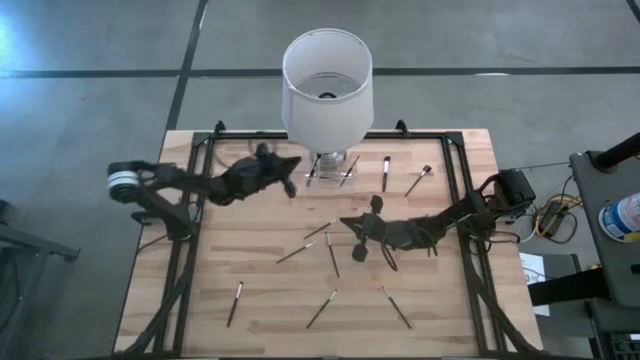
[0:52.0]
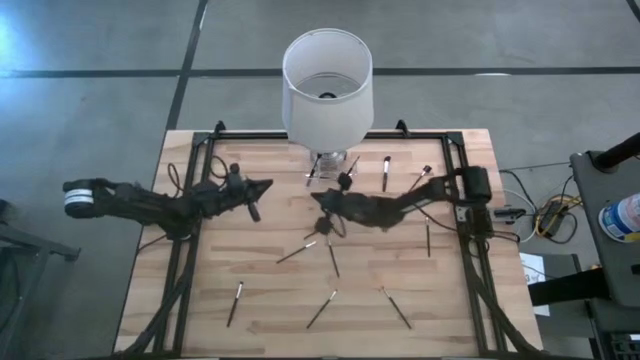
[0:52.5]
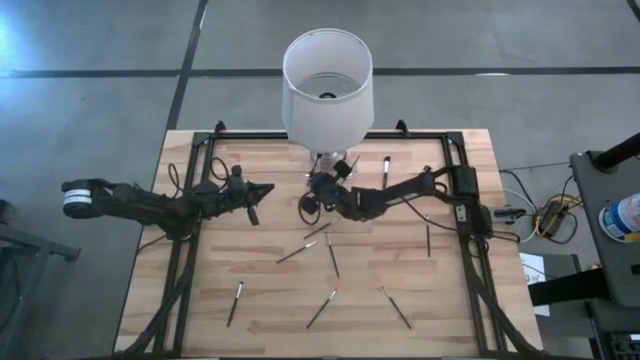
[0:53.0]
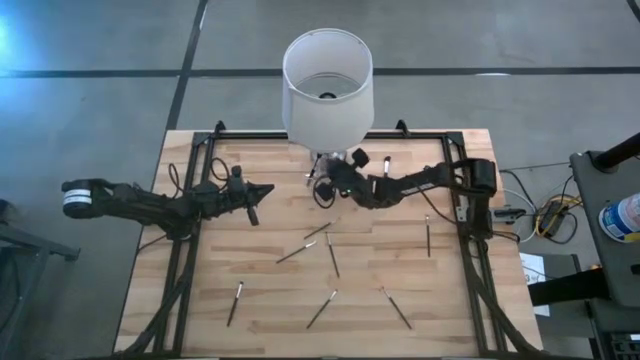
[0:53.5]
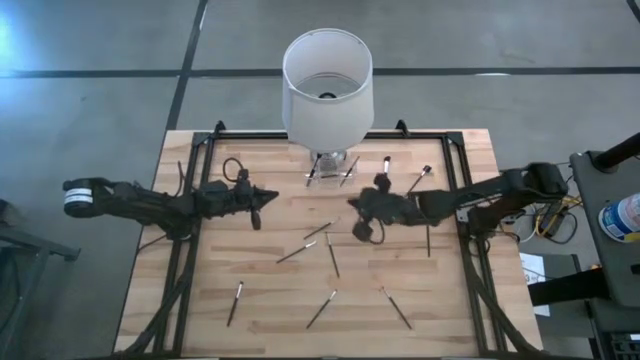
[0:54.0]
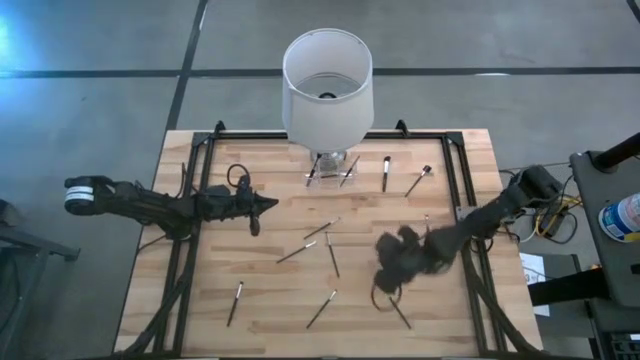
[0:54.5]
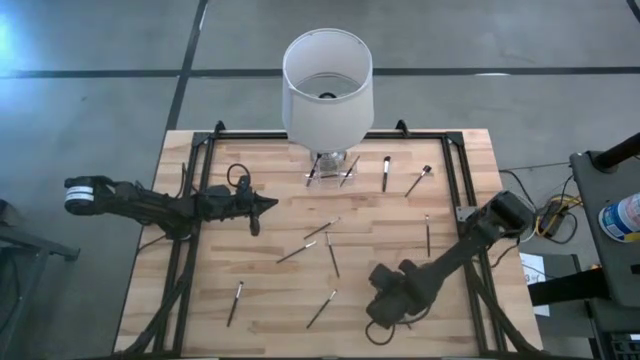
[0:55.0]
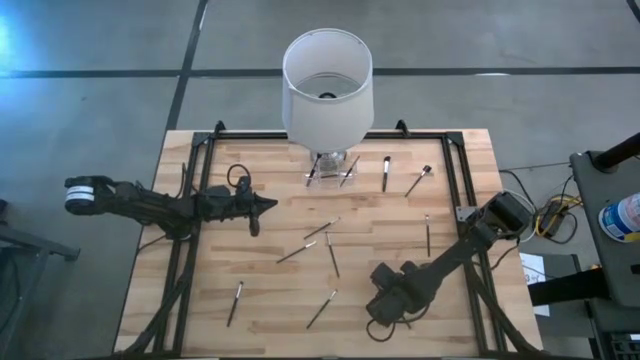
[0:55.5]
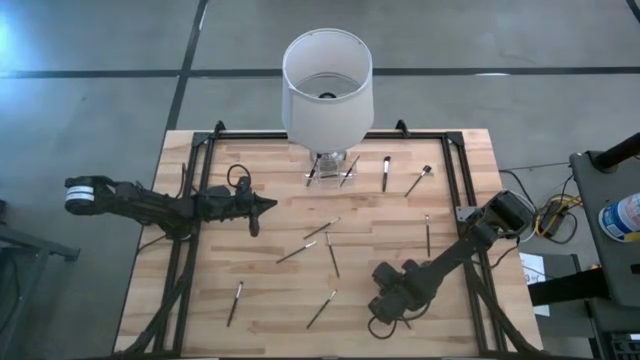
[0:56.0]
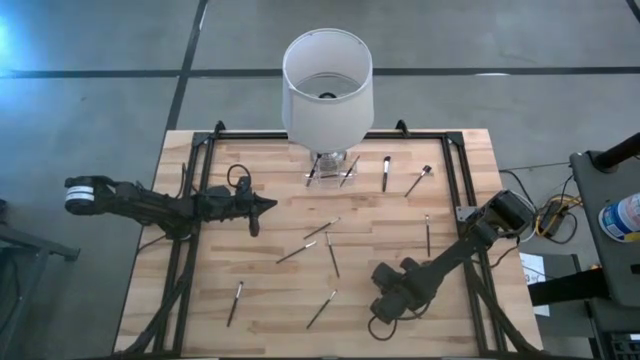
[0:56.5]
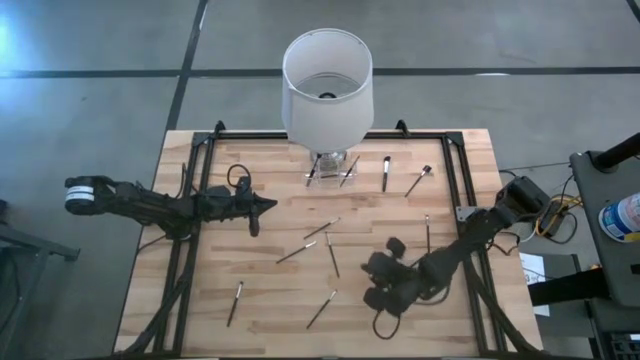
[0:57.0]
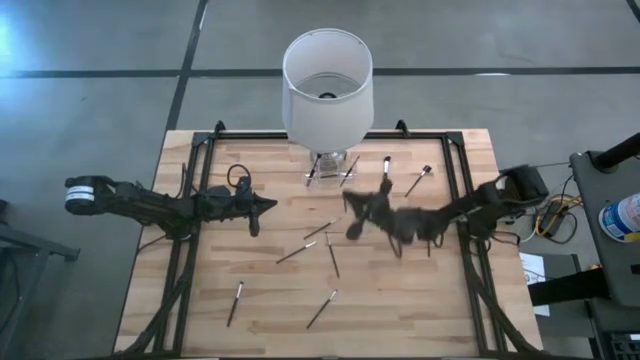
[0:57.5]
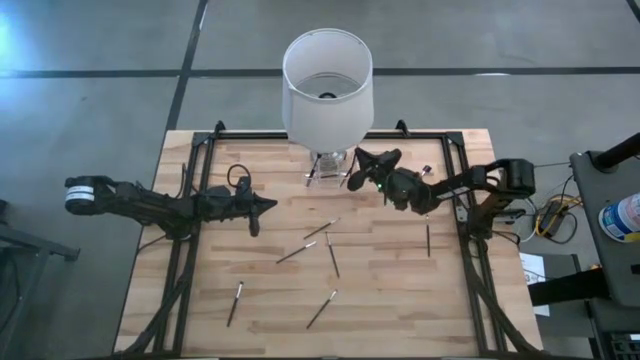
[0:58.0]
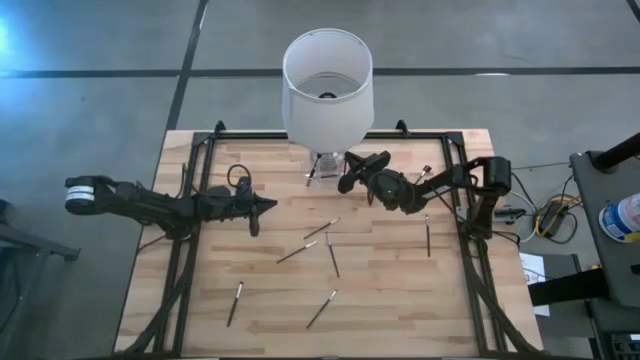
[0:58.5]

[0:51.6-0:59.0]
Task: Put items in baskets/containers
Put the black eyeshadow brush into the transparent organizer

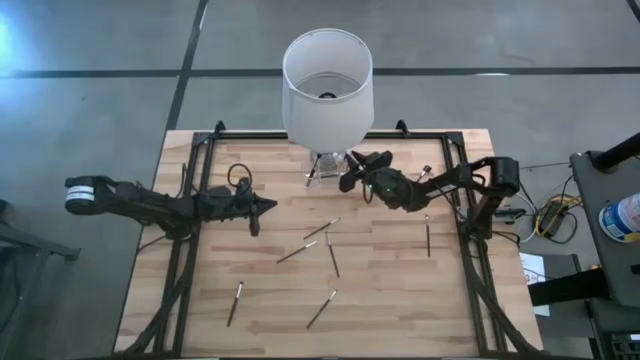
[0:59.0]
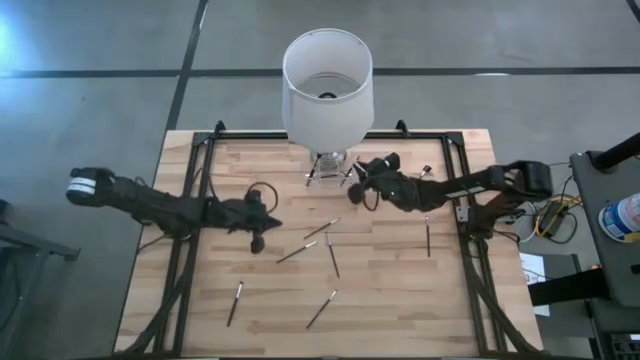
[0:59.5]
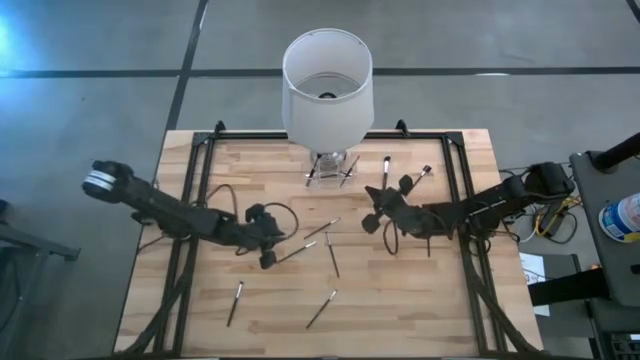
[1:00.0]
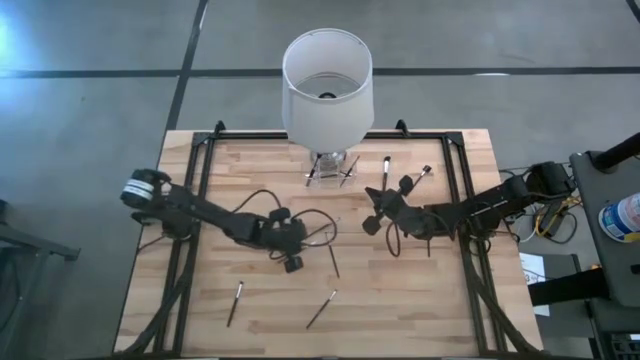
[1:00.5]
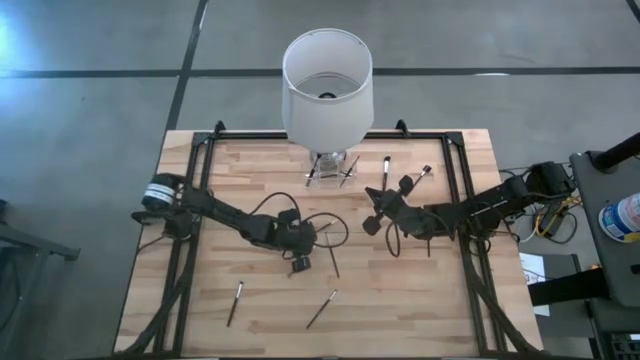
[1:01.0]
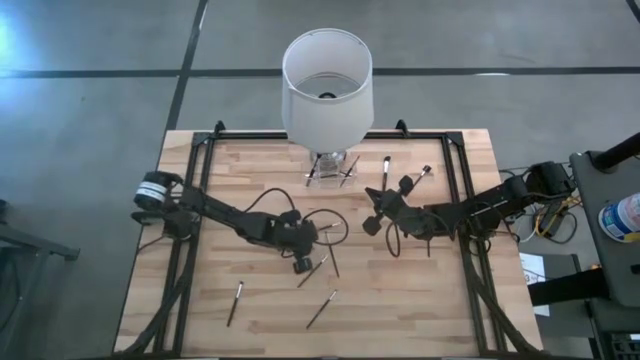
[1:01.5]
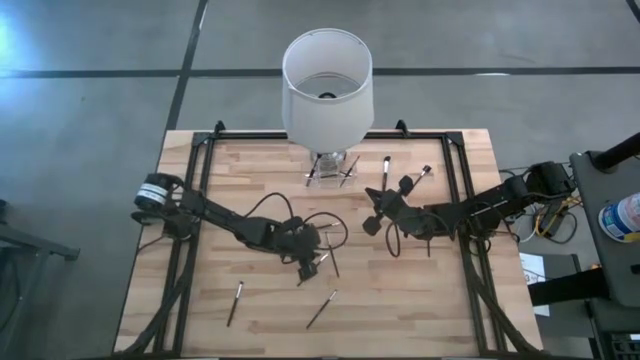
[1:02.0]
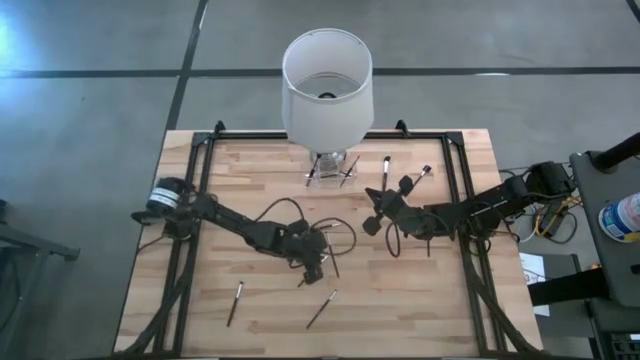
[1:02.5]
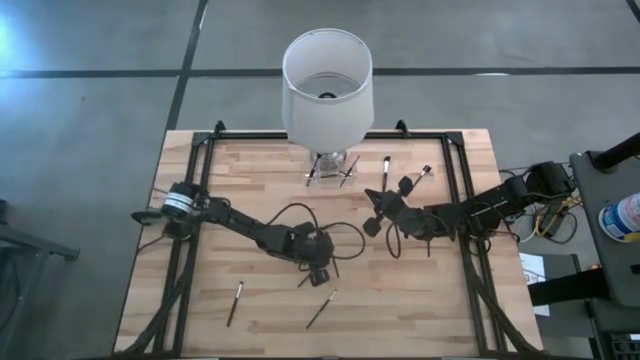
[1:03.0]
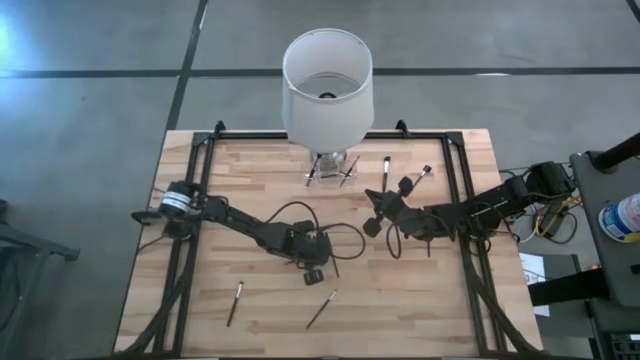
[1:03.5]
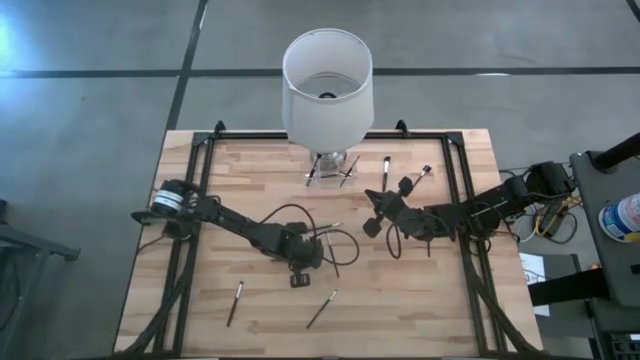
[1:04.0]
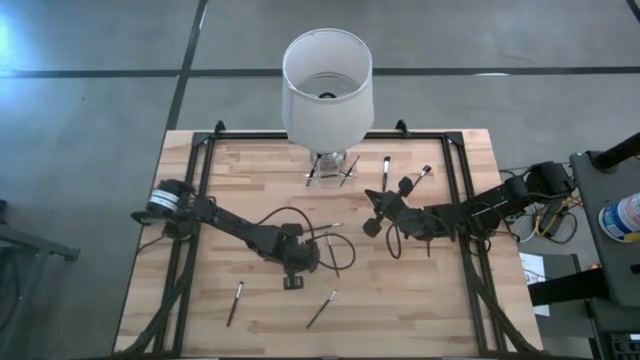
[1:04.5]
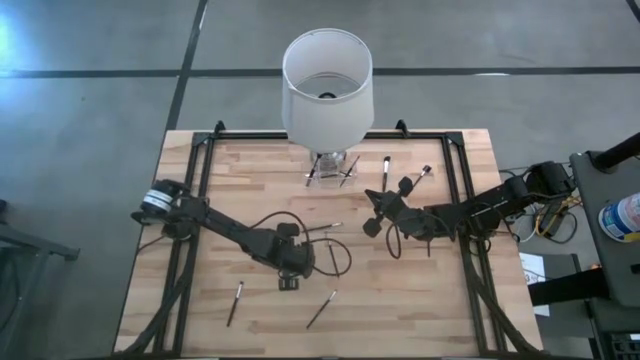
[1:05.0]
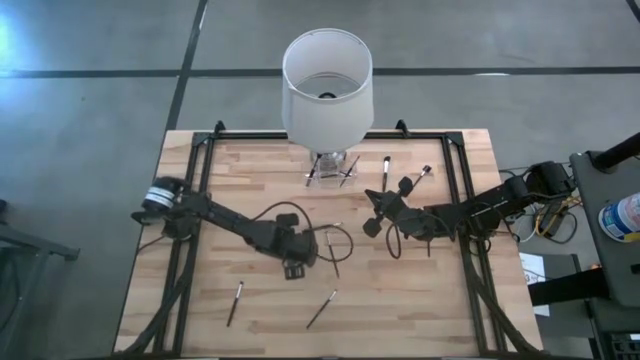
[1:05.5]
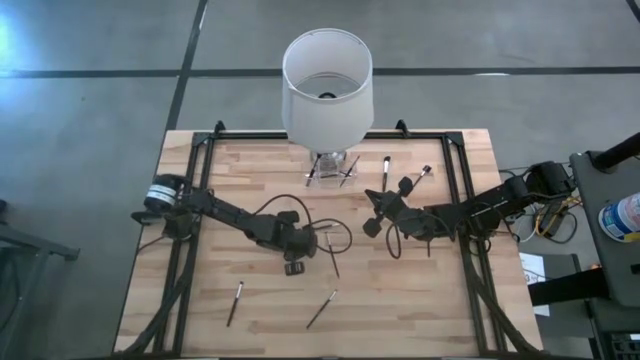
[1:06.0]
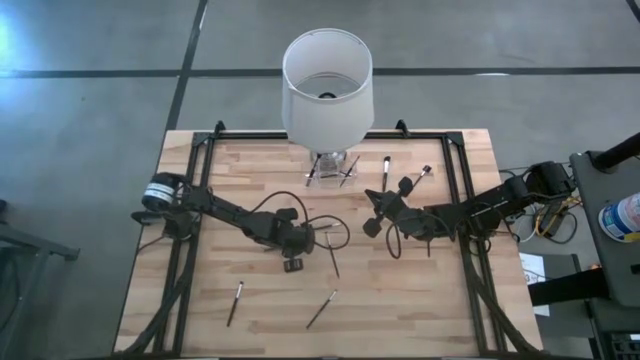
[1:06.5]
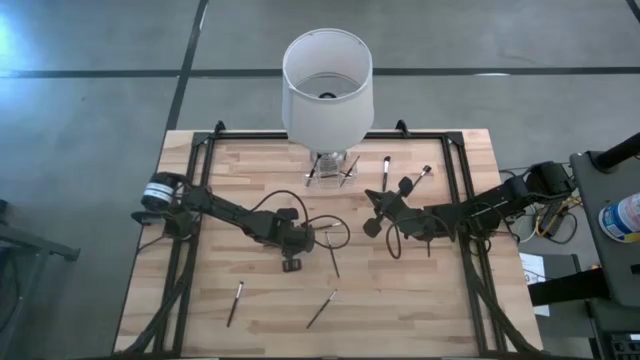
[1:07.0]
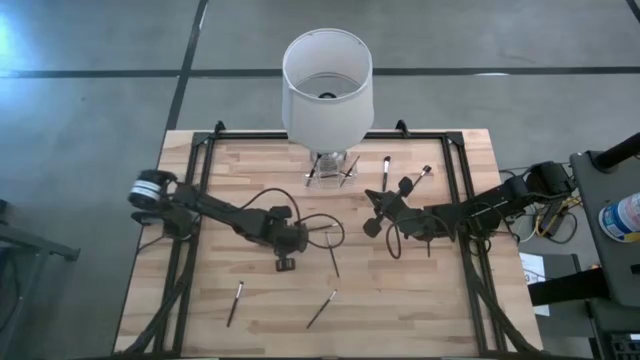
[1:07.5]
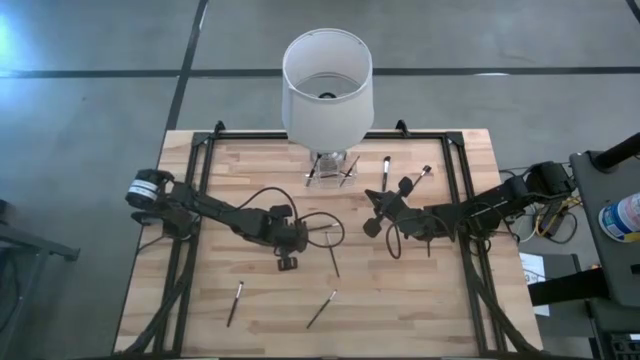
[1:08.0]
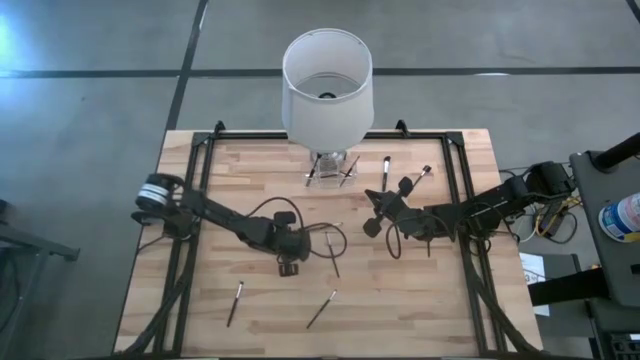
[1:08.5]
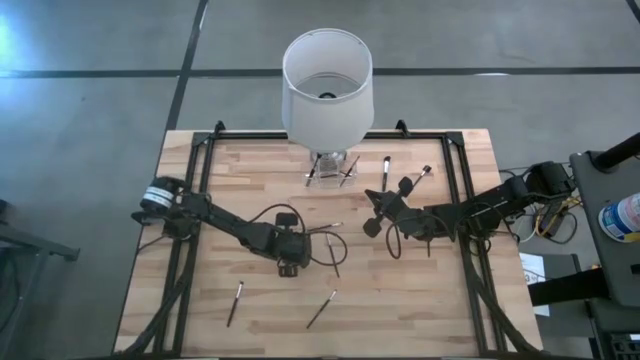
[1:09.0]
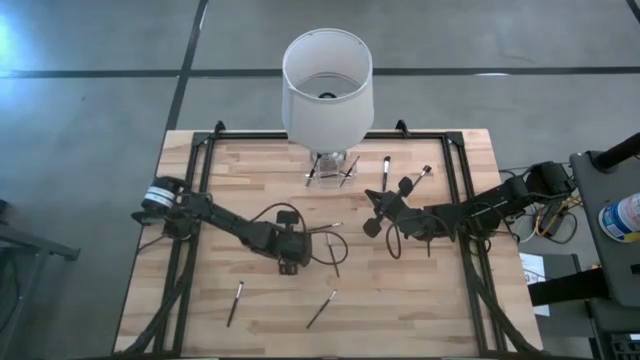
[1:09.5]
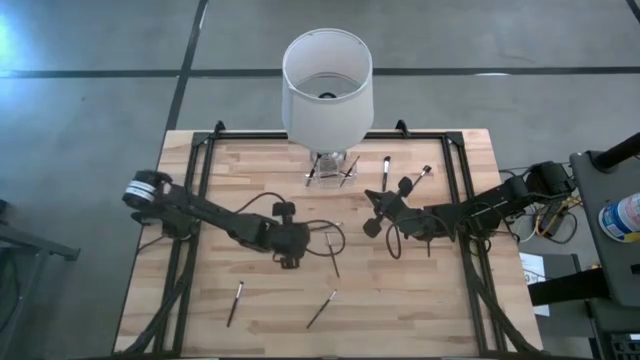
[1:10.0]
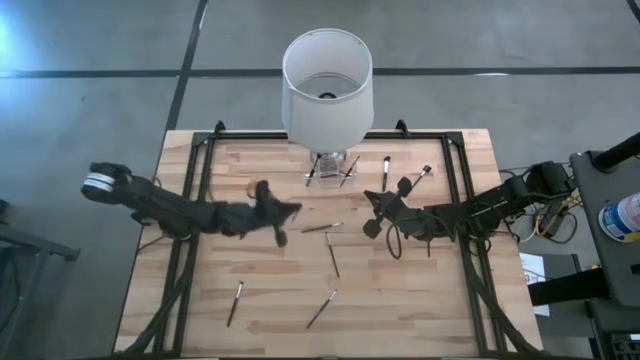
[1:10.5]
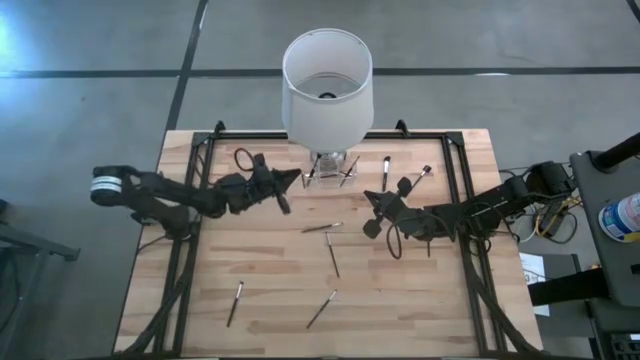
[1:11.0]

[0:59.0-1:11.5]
Put the black eyeshadow brush into the transparent organizer

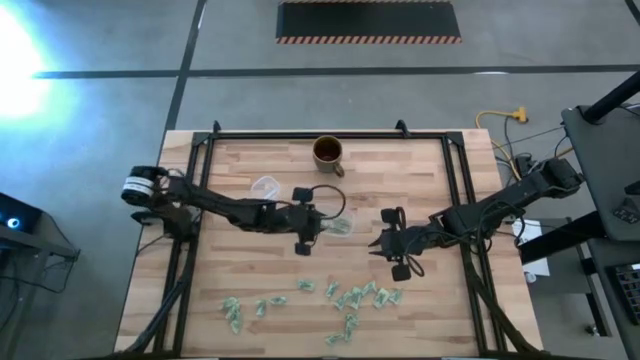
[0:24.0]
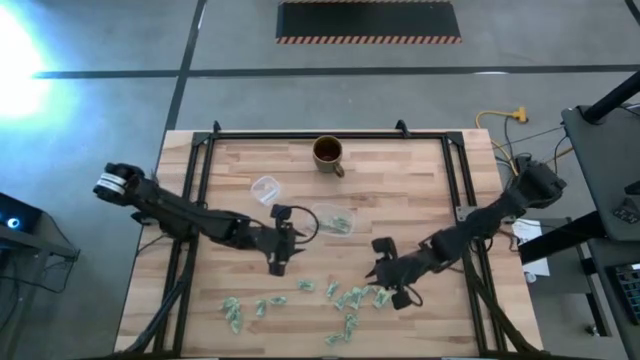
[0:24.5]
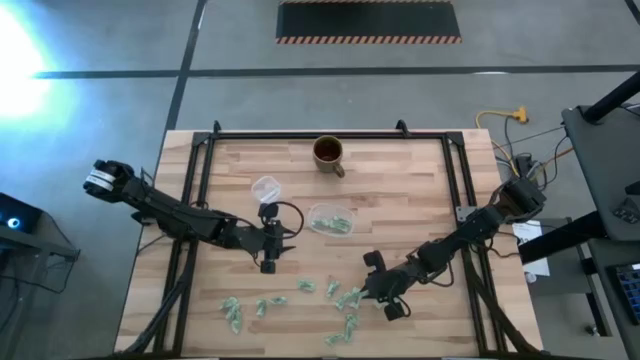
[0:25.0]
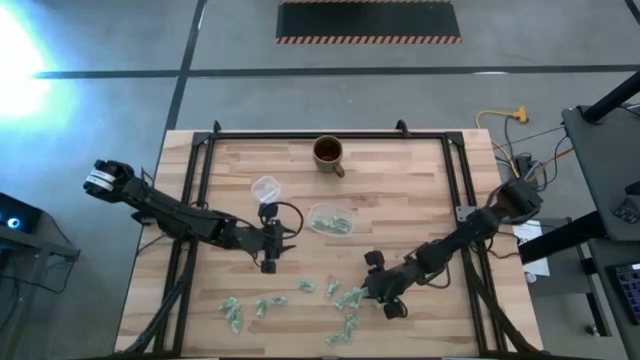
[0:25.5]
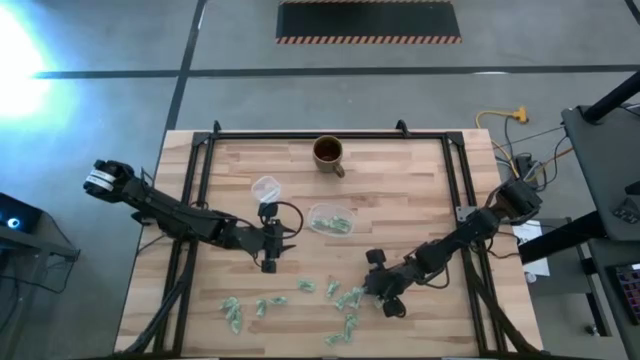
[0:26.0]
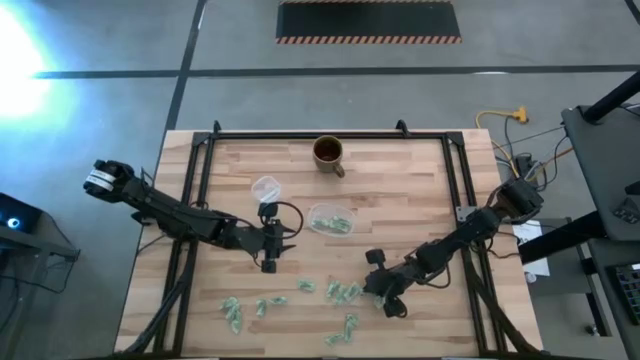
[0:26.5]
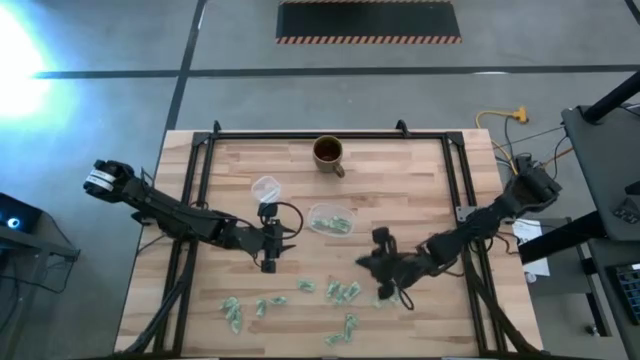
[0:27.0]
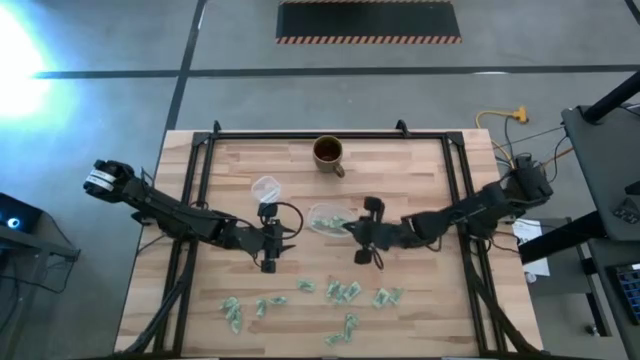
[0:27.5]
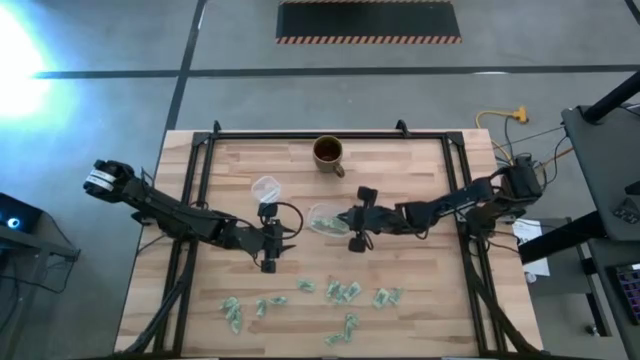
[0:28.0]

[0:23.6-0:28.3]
Task: Pick and place Stevia / Truvia into bins
Put the green stevia packet into the transparent container
